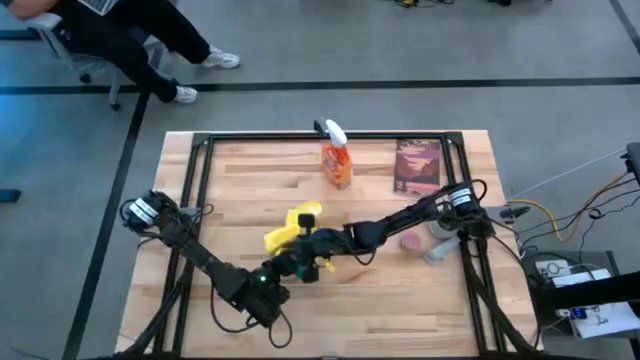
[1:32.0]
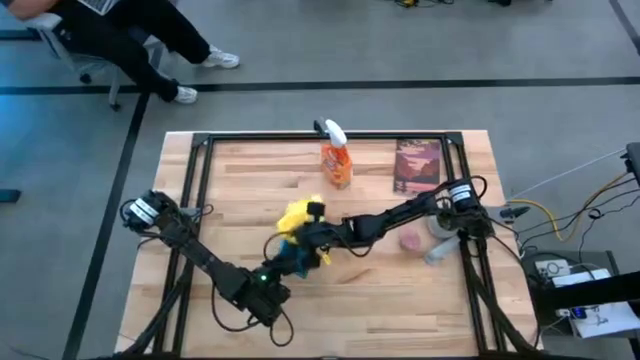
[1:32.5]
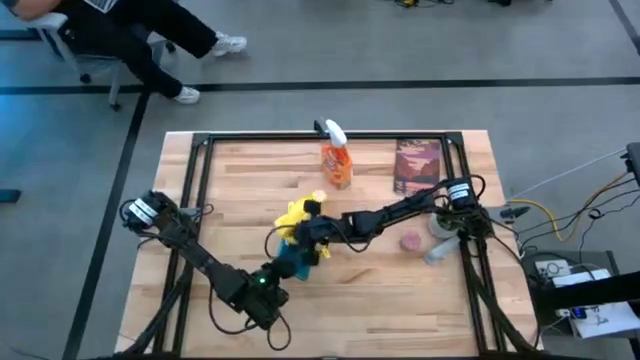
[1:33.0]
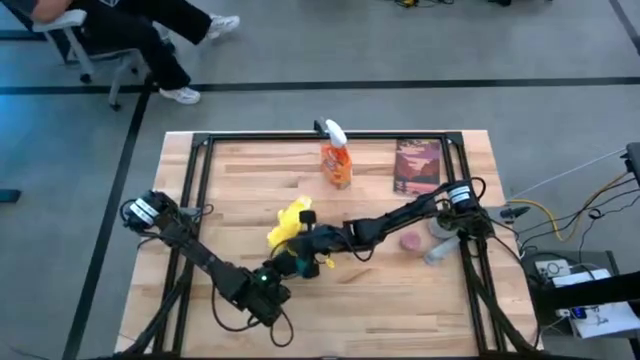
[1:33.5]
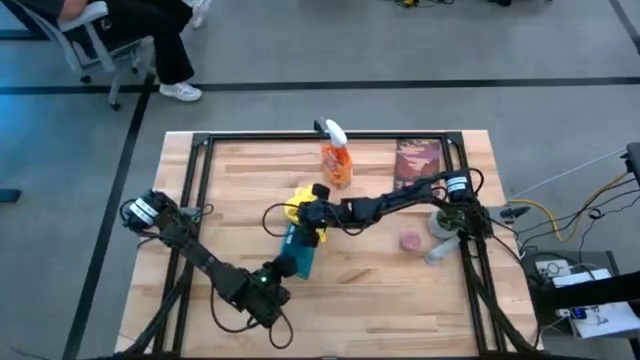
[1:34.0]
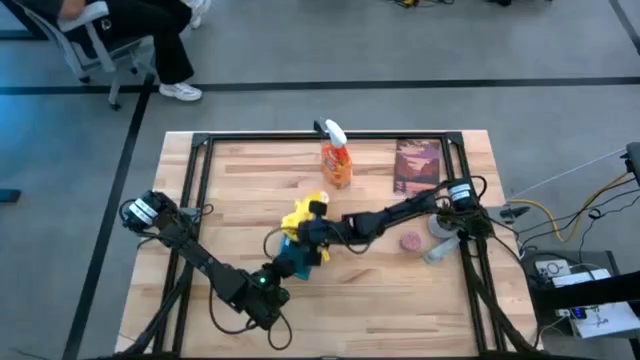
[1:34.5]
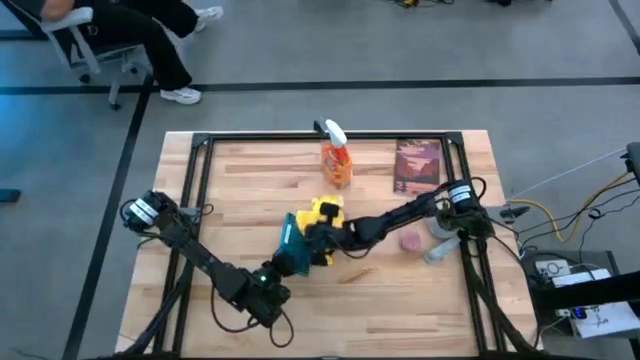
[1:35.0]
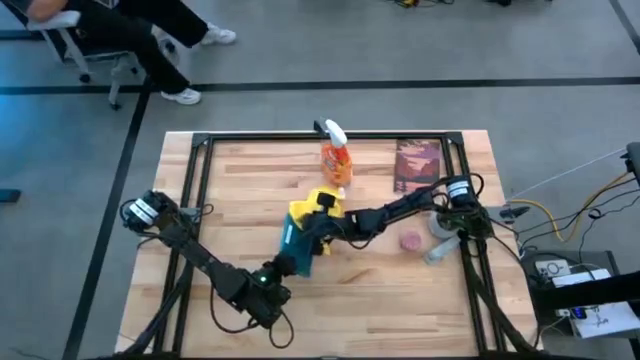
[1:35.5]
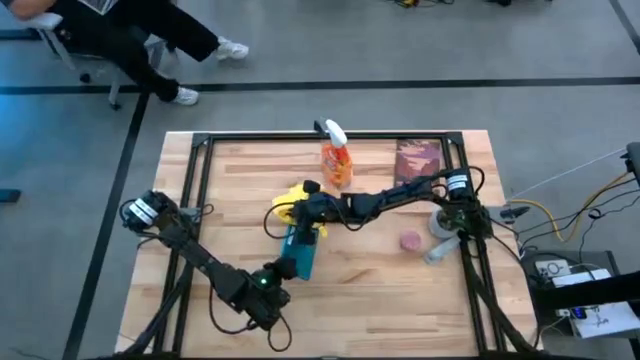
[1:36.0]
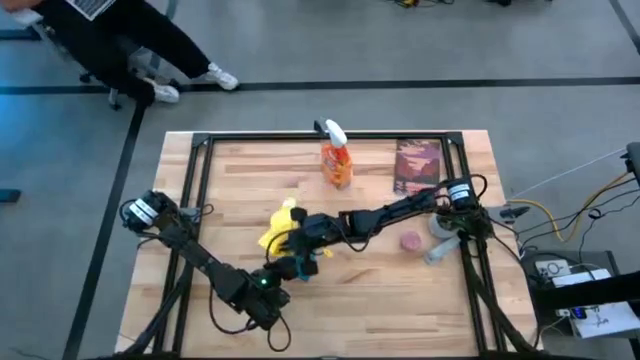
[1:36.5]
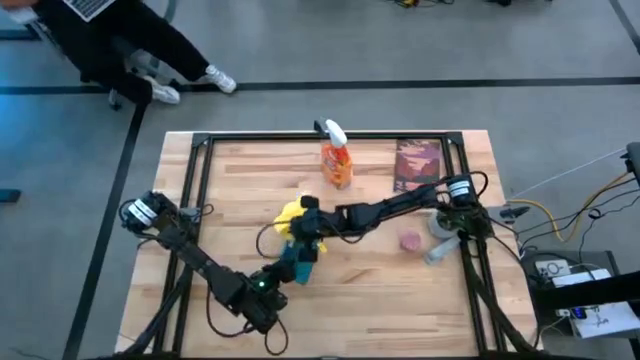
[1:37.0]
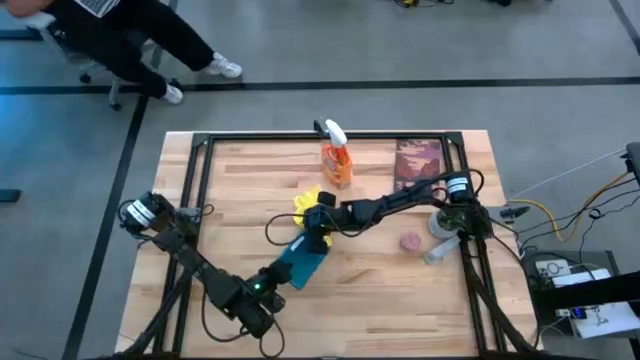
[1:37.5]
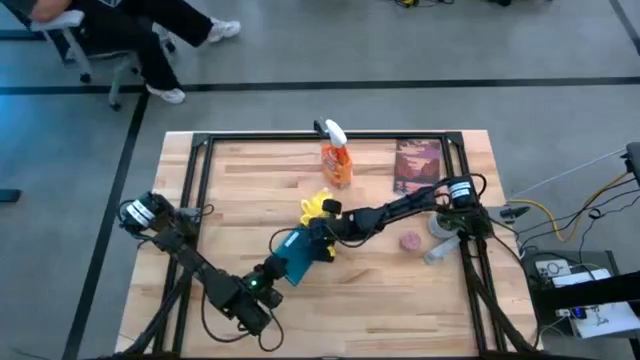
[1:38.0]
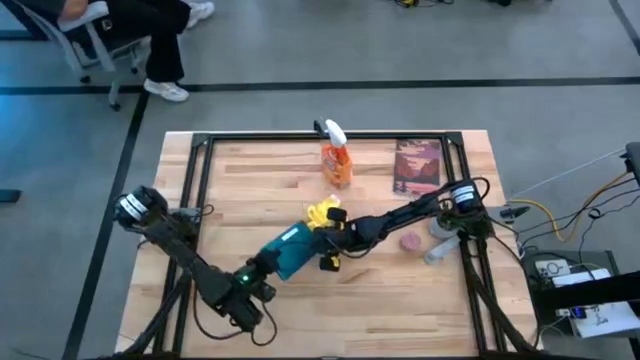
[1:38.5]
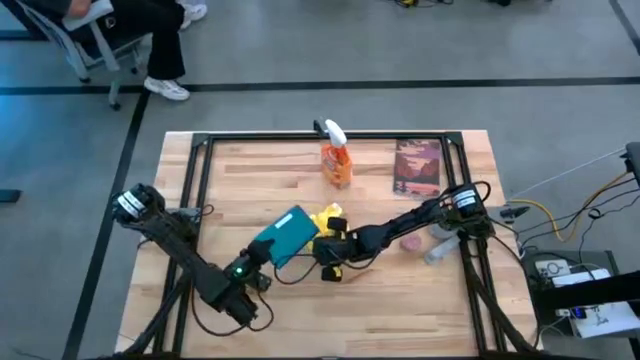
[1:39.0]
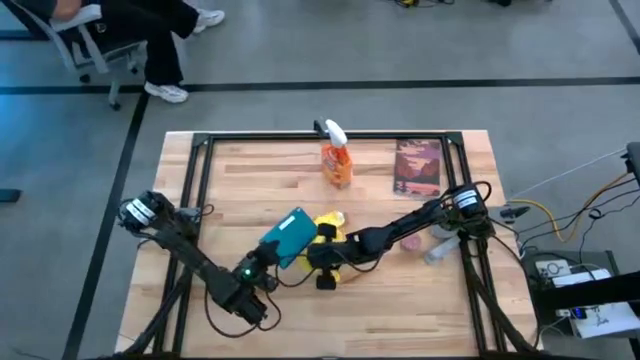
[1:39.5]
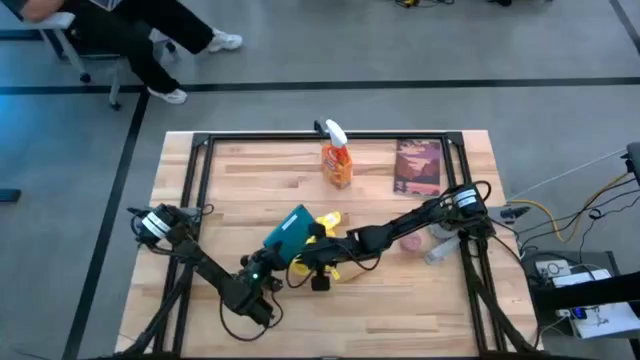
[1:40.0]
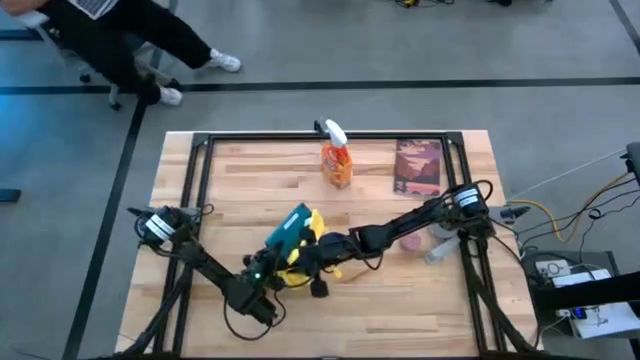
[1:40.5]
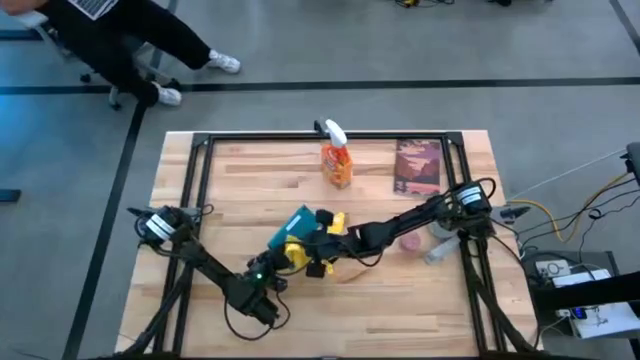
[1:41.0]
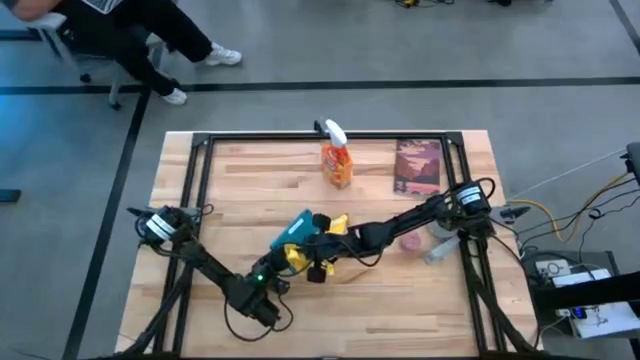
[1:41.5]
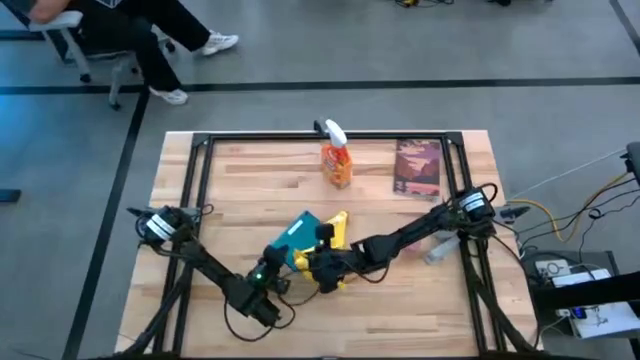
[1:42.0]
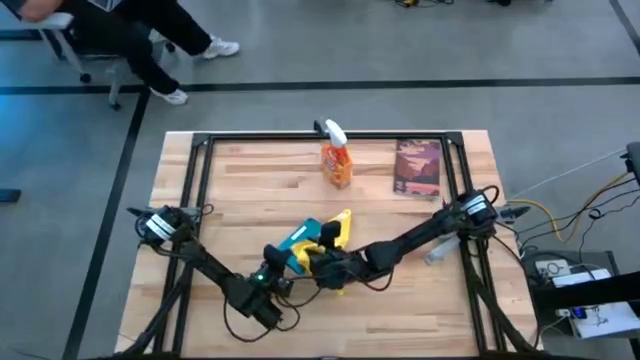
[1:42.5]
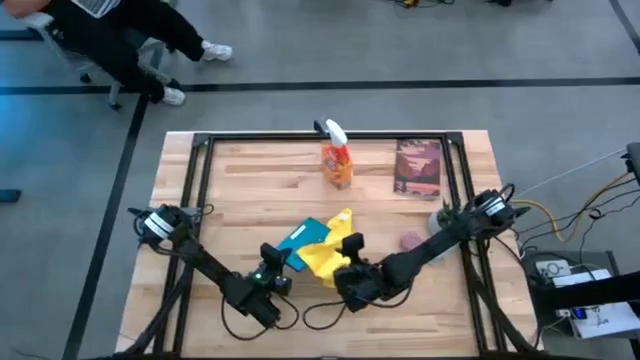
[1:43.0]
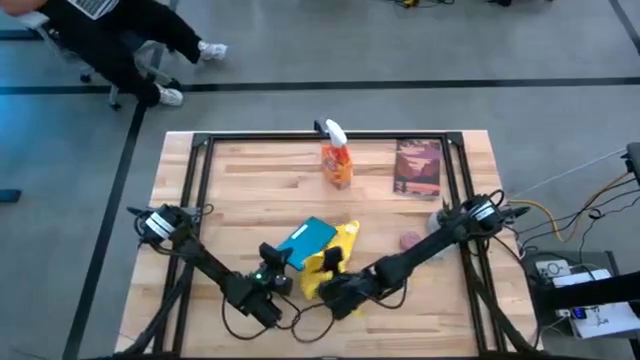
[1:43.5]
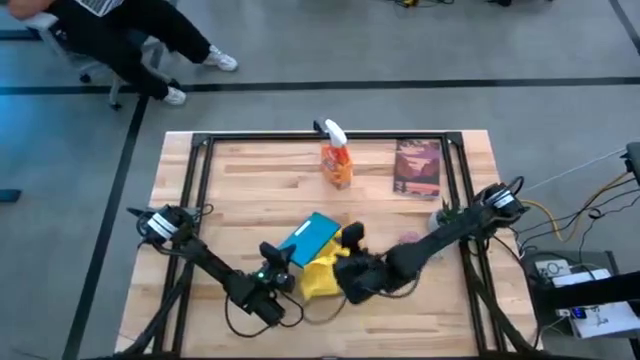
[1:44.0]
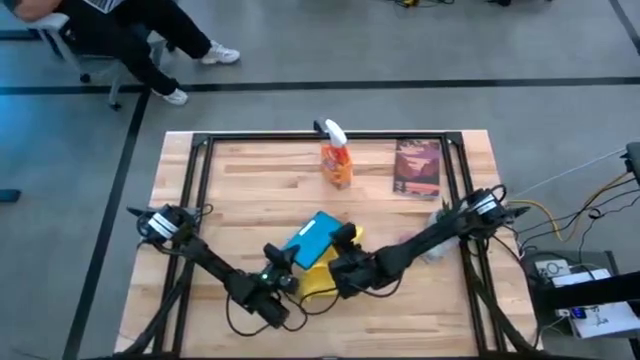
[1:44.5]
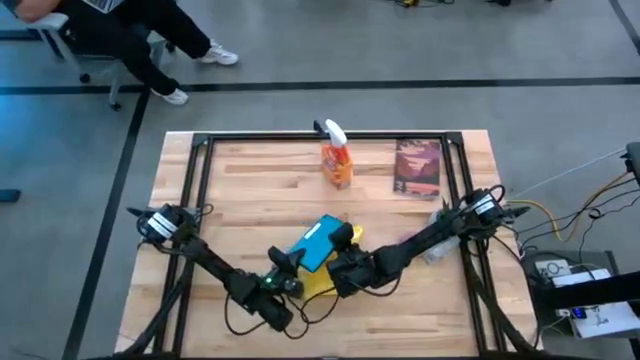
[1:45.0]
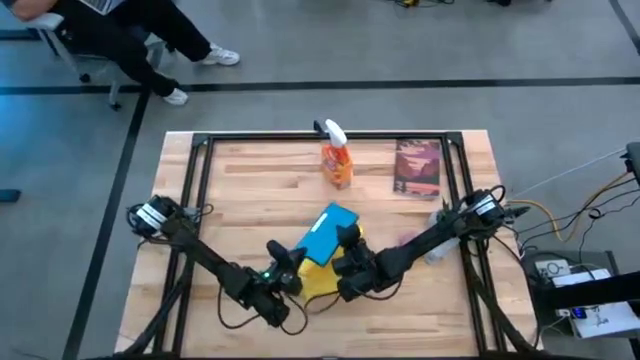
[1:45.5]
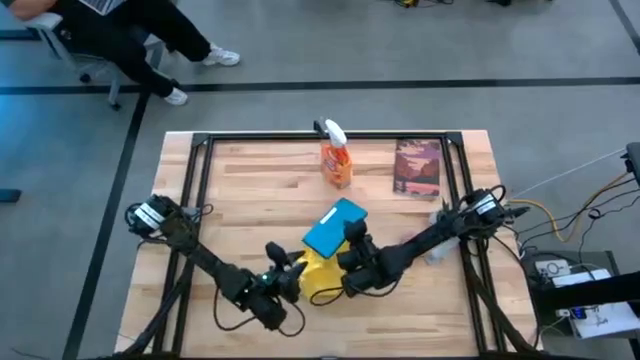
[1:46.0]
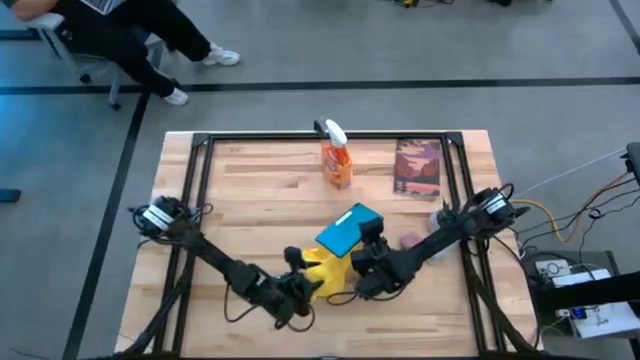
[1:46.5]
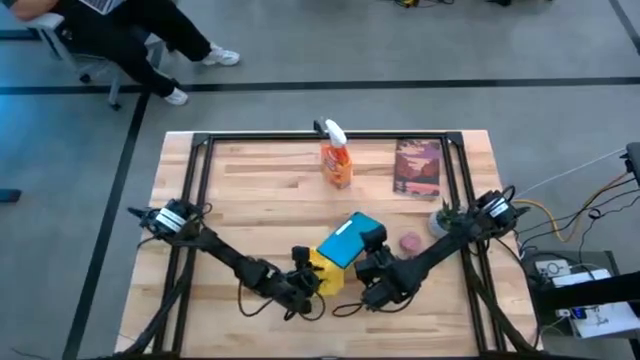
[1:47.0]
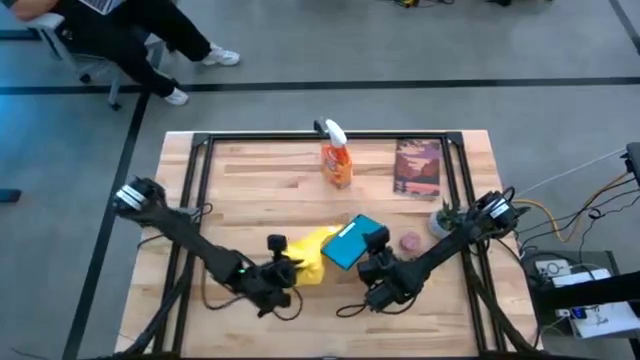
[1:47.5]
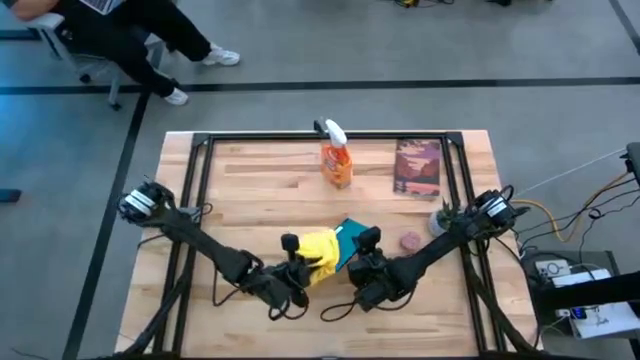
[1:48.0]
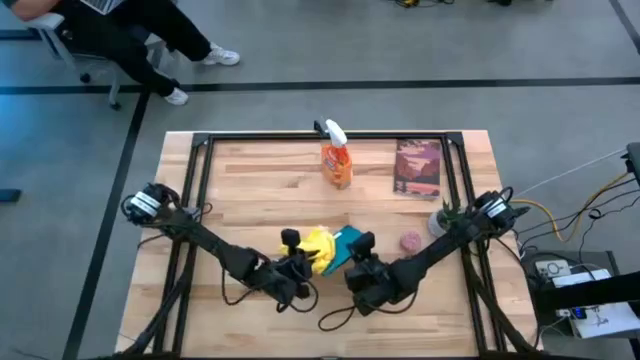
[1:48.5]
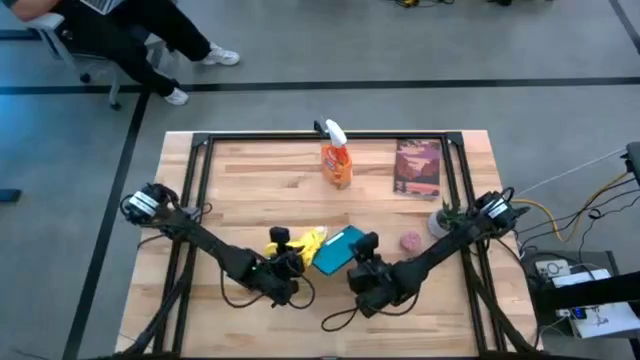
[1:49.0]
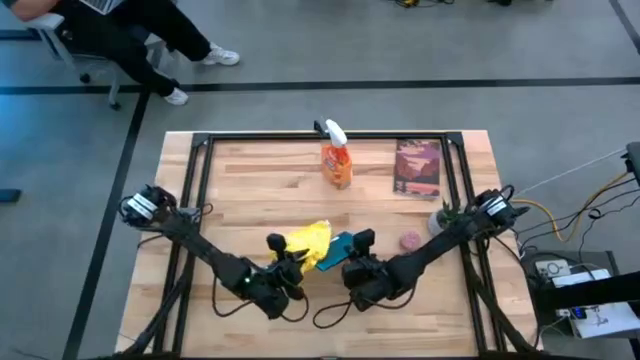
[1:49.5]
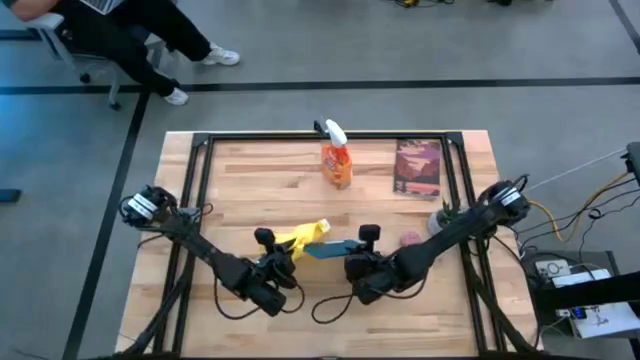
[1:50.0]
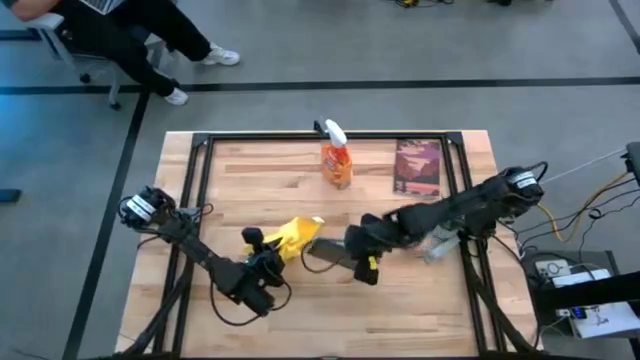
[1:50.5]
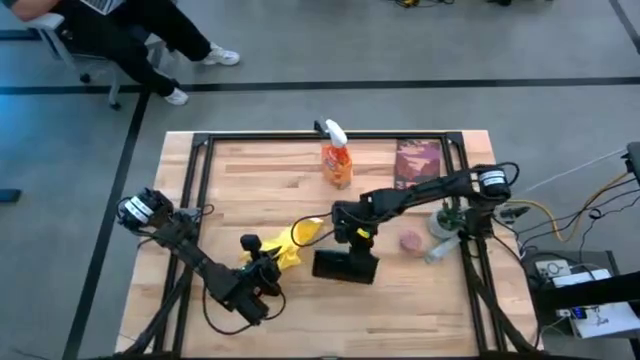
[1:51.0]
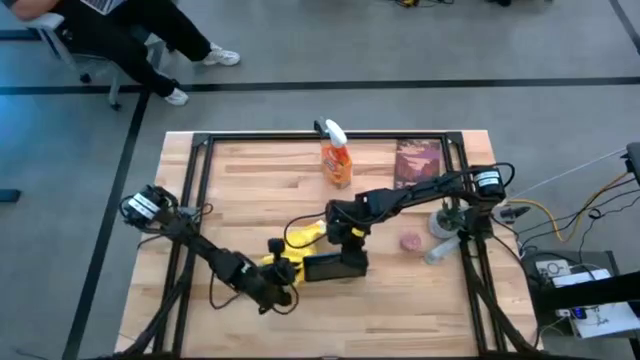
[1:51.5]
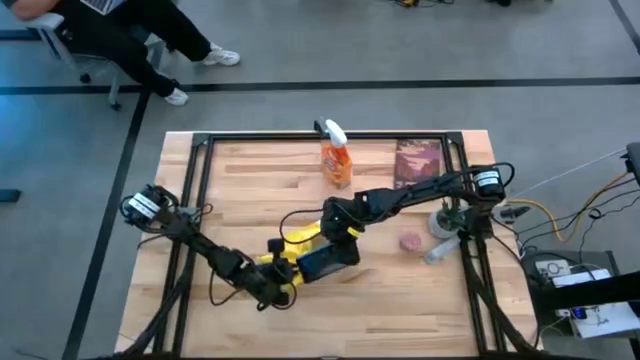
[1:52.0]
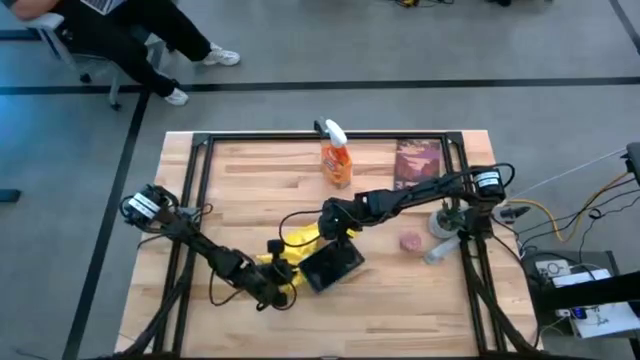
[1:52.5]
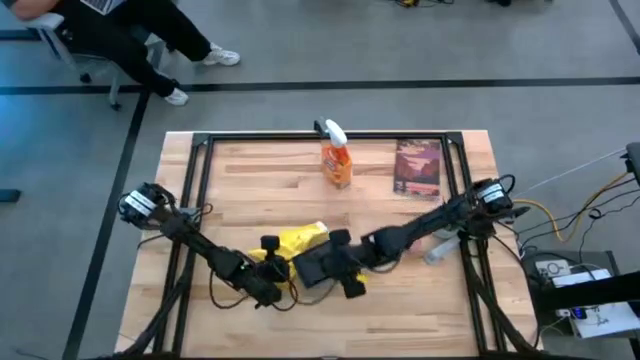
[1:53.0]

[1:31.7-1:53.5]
Task: Apply microfiber cloth
Wipe the front and back of the tablet with the yellow microfiber cloth
